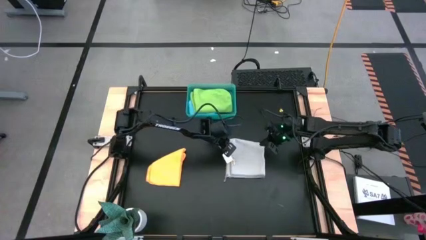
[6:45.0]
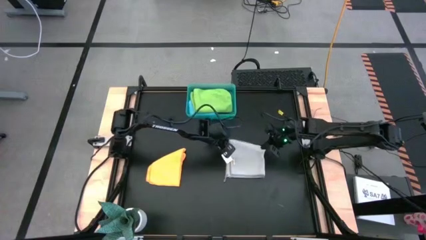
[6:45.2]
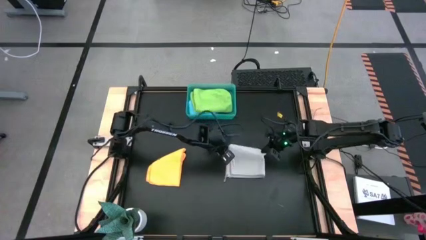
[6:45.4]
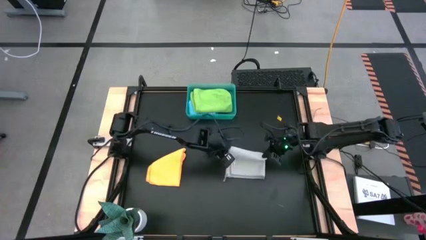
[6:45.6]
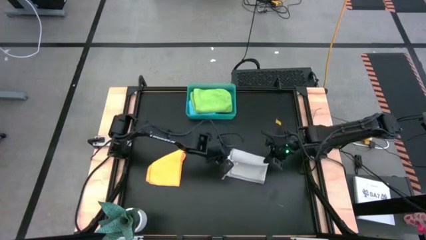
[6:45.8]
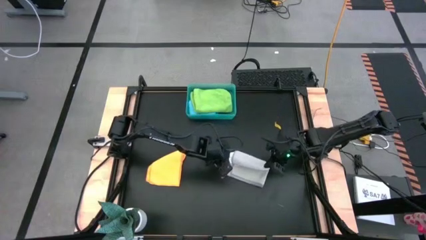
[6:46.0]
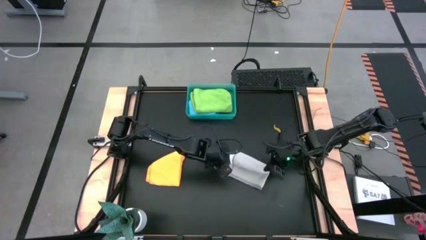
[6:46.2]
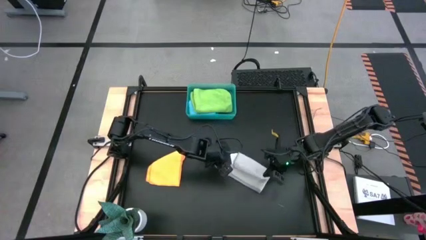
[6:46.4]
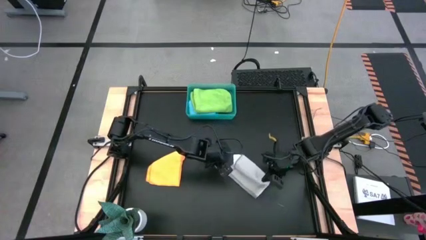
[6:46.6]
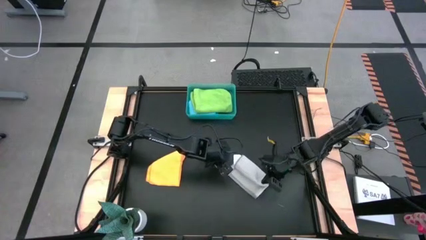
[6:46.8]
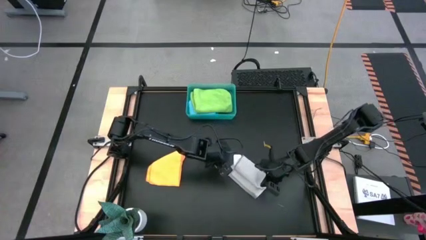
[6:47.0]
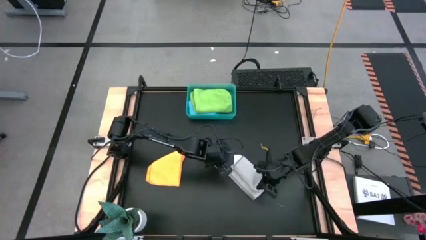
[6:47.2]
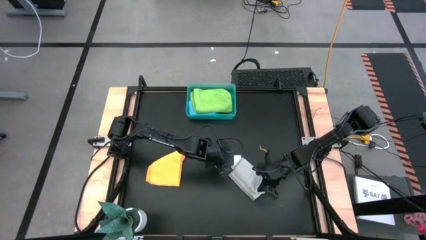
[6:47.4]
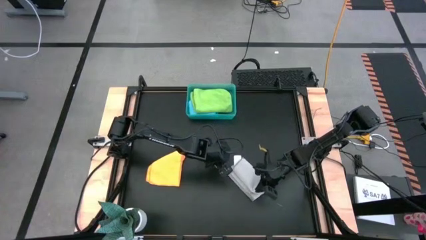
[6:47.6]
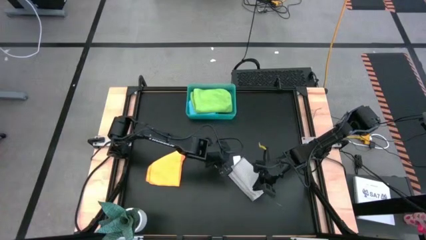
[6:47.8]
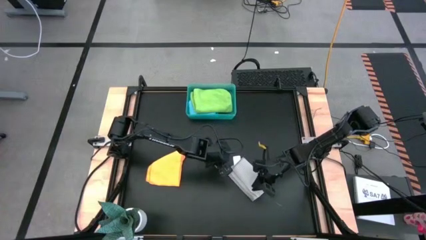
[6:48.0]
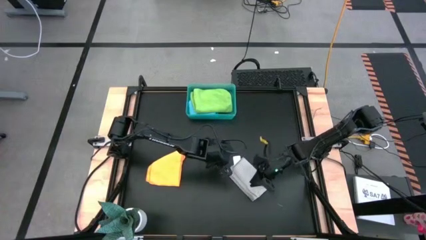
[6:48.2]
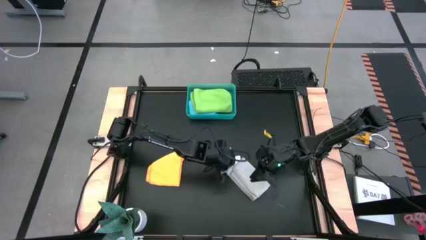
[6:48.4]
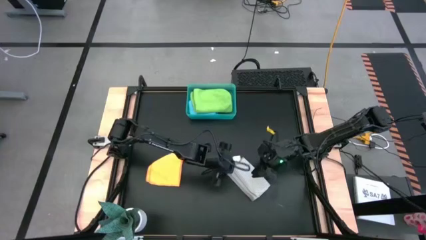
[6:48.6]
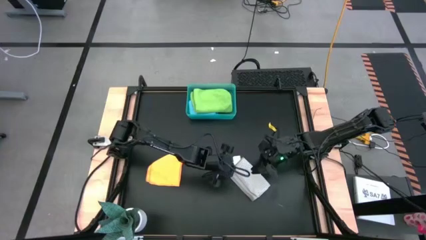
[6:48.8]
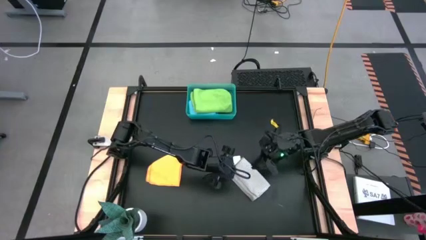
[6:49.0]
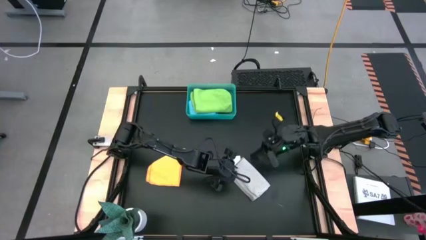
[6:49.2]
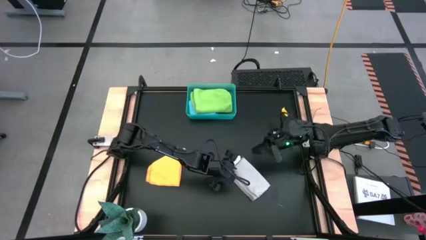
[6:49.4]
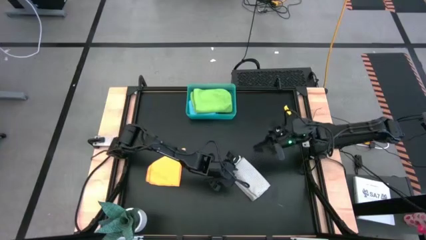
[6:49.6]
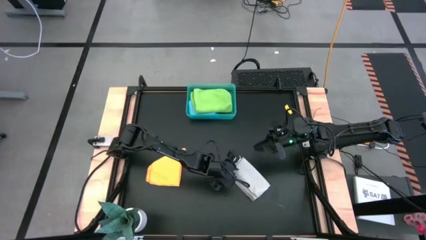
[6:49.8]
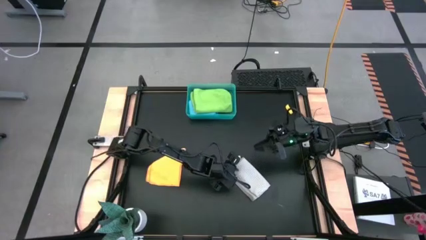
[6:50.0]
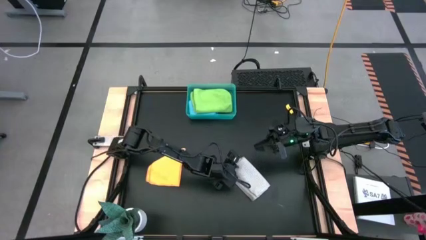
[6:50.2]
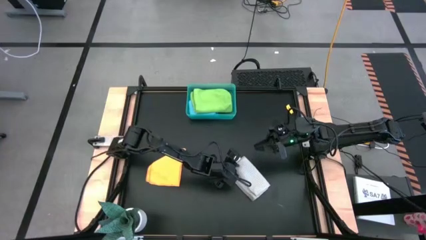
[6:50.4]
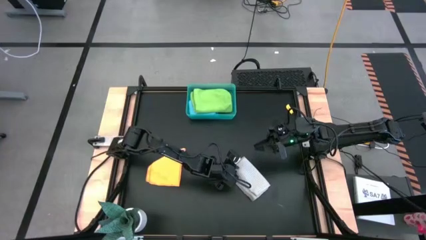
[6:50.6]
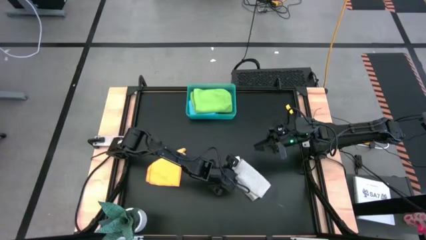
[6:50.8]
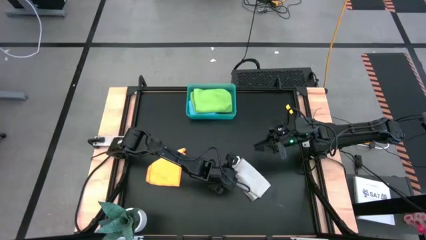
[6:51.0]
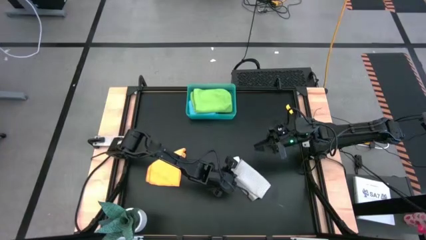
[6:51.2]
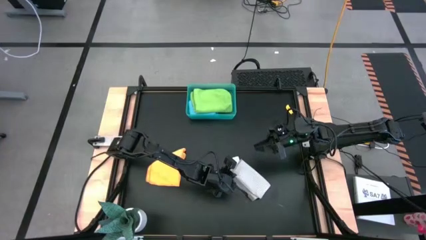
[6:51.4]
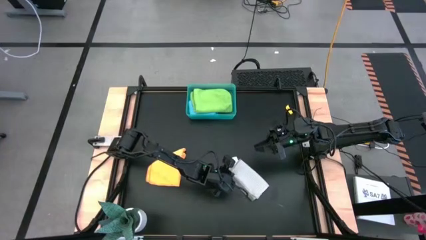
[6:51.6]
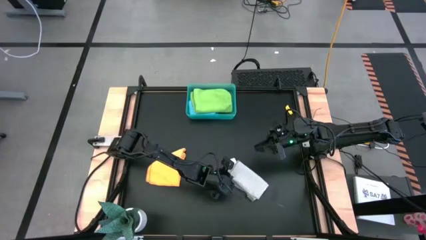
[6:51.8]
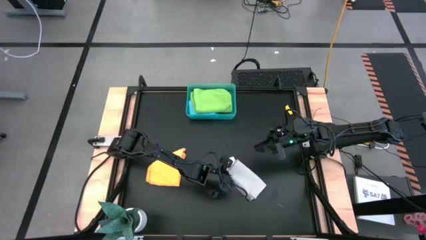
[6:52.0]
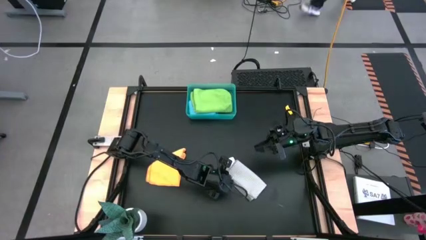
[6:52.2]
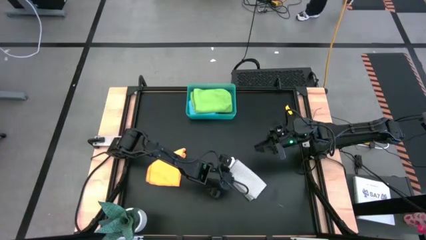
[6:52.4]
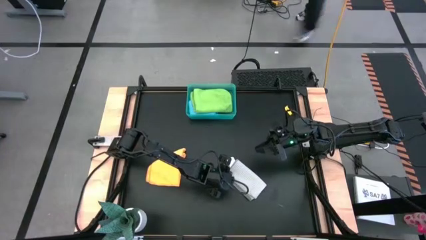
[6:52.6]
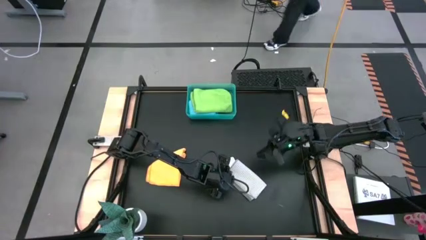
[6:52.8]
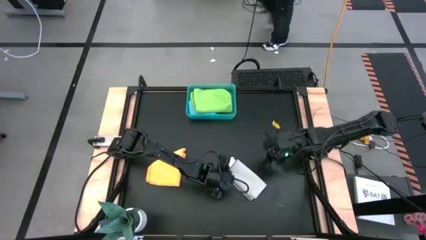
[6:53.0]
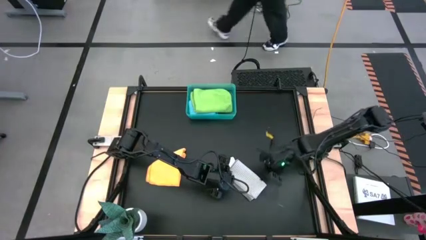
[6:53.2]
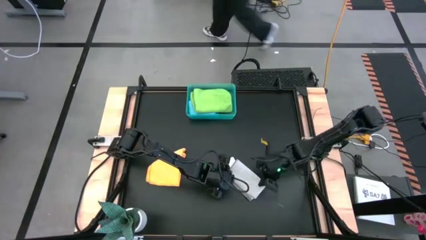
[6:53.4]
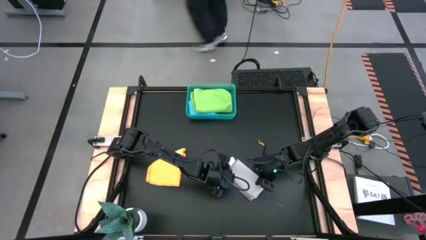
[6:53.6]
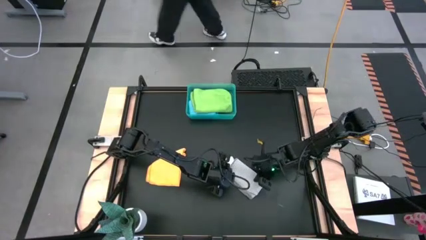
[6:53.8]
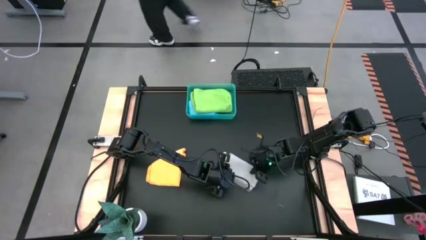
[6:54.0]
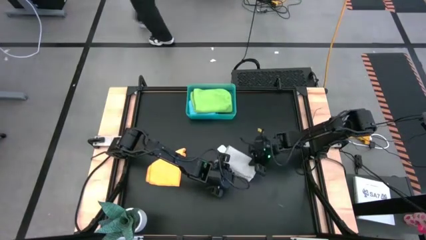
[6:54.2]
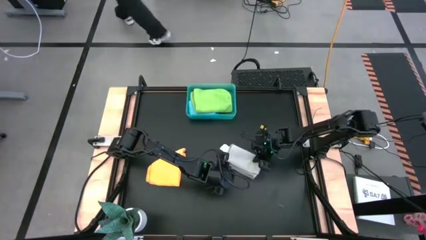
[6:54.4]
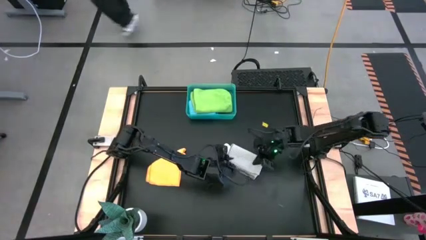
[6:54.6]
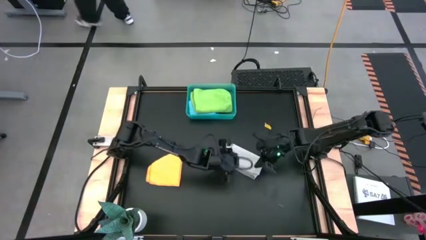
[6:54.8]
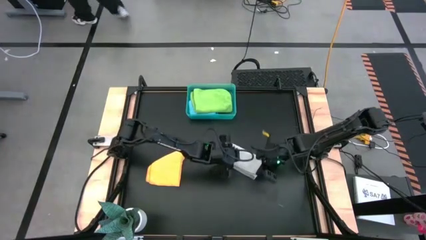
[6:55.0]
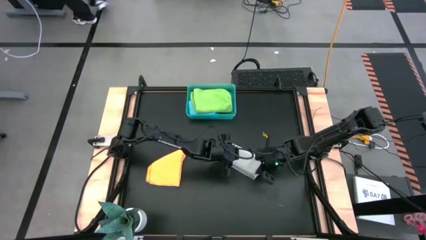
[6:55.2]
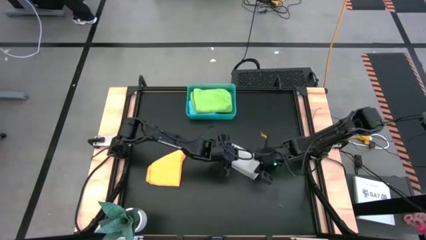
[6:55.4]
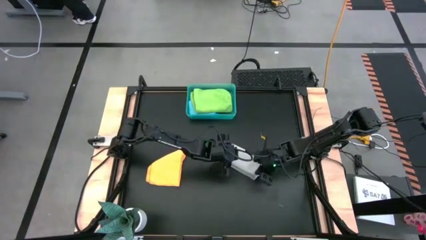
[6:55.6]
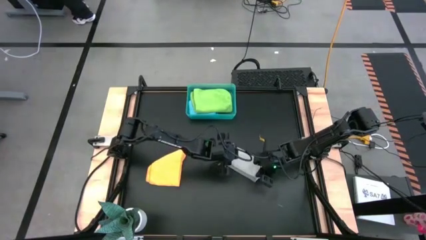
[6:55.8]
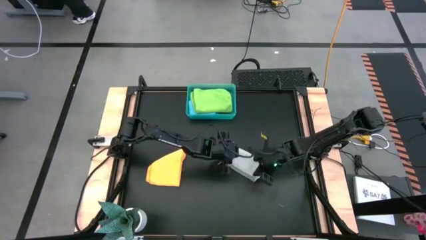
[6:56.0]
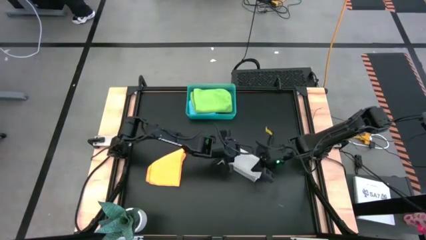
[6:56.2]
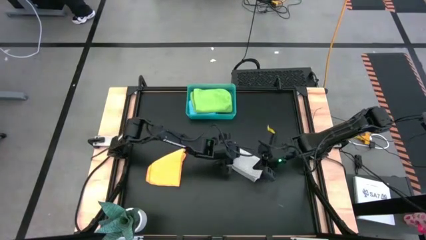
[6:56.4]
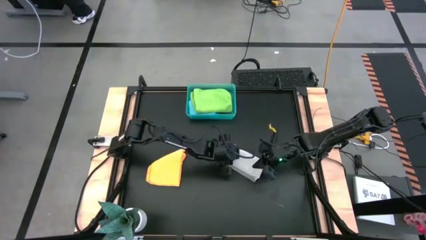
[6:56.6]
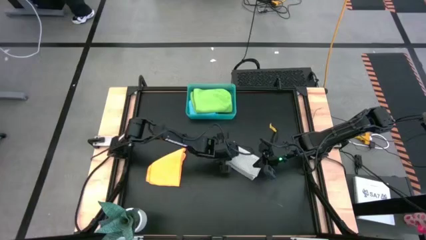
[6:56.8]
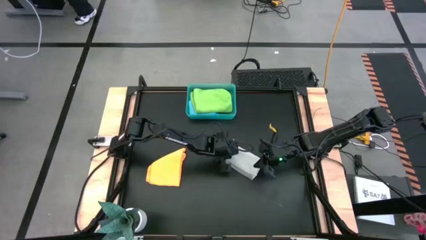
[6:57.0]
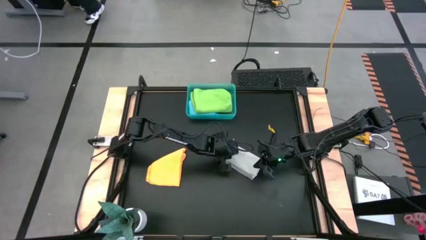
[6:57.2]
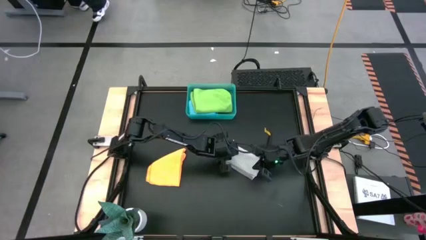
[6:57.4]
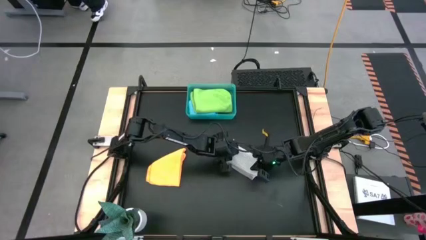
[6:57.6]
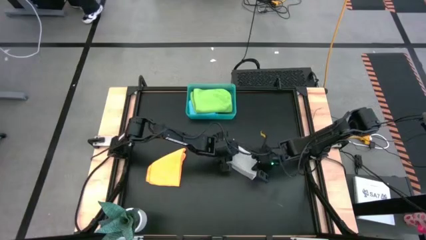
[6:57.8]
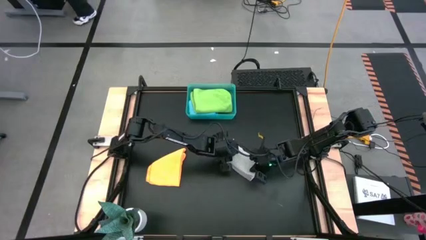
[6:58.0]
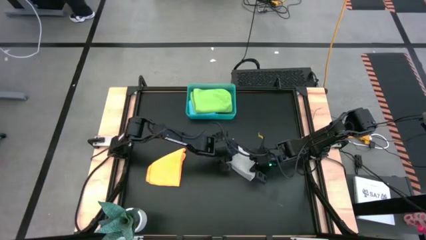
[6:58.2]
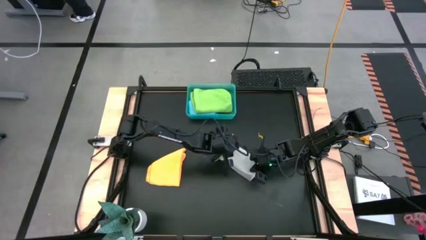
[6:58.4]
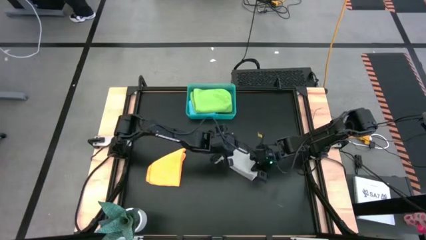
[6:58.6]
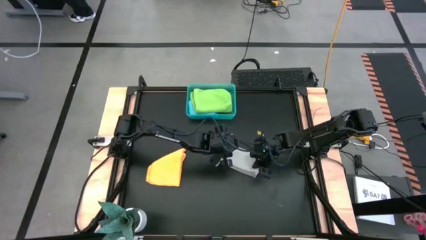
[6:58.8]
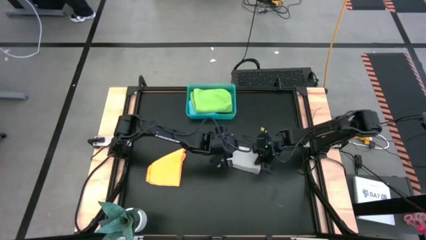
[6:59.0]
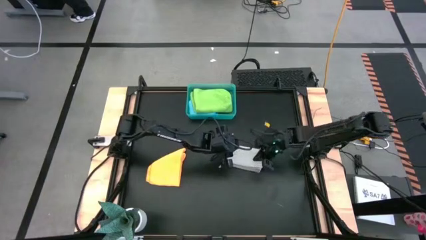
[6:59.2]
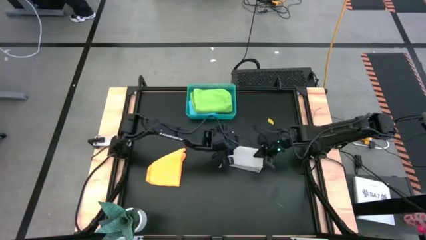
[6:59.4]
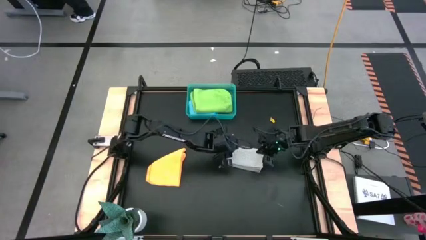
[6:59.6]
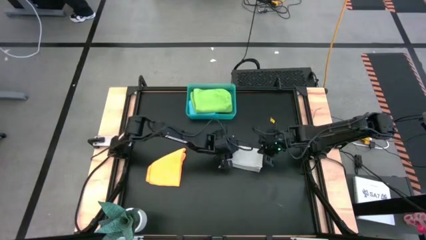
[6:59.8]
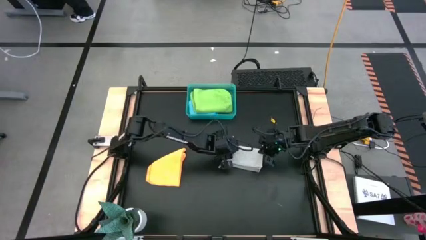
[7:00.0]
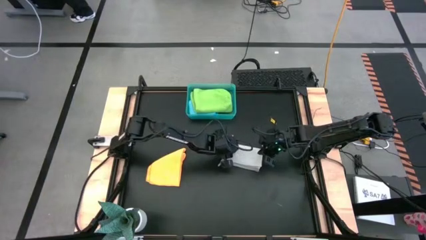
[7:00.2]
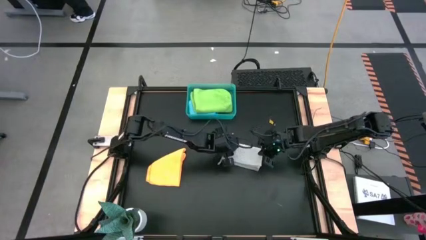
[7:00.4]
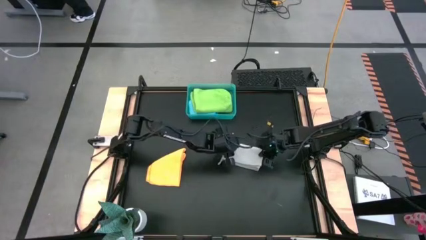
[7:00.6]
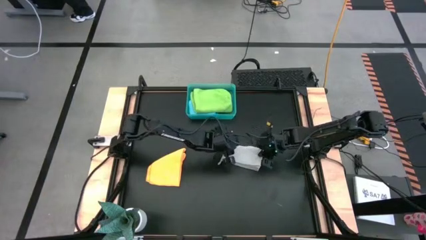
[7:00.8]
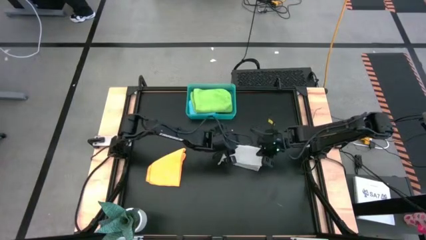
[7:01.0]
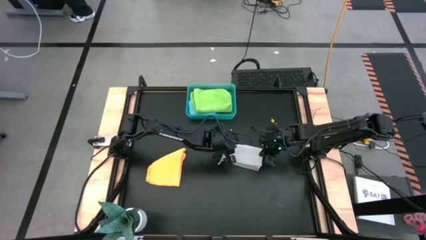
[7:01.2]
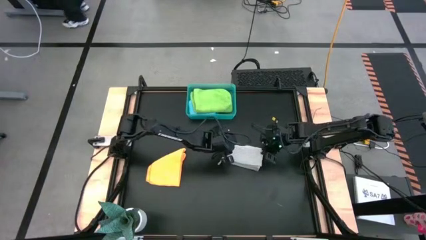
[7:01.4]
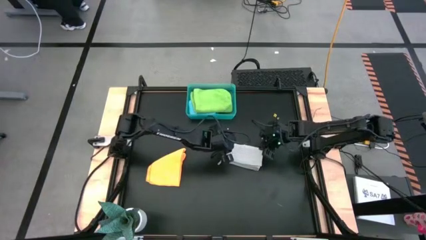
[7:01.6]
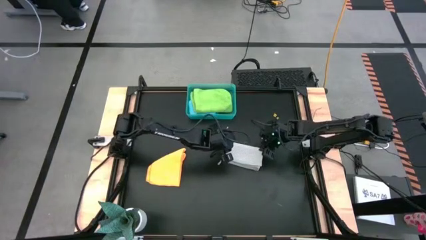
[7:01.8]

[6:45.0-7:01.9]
Task: Fold microfiber towels
Fold the gray towel
